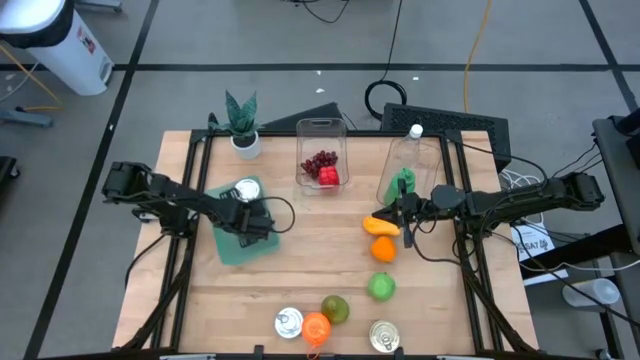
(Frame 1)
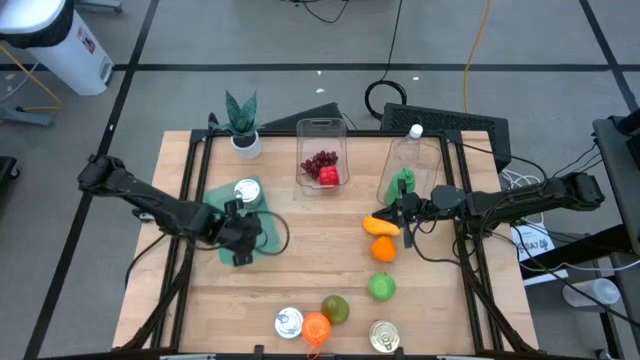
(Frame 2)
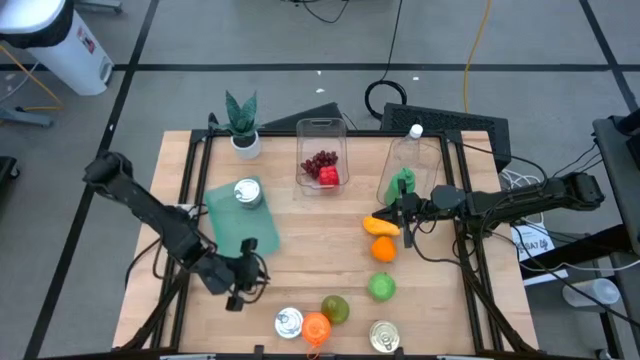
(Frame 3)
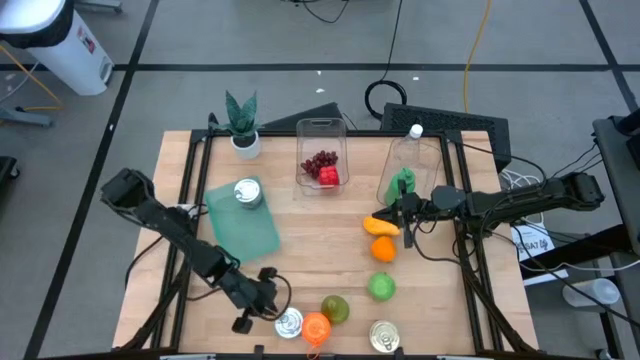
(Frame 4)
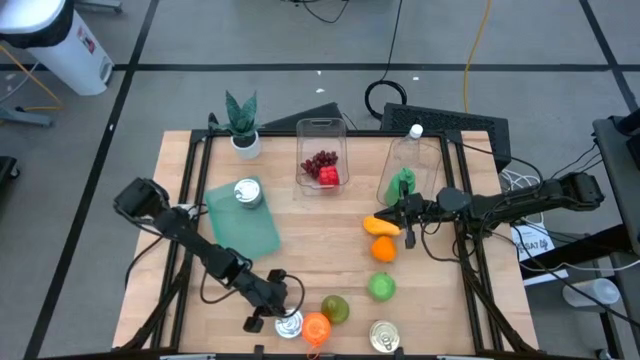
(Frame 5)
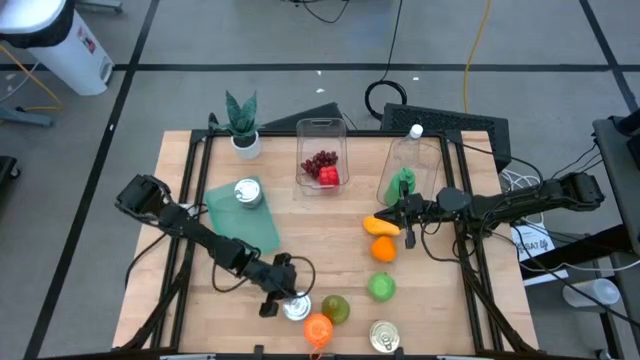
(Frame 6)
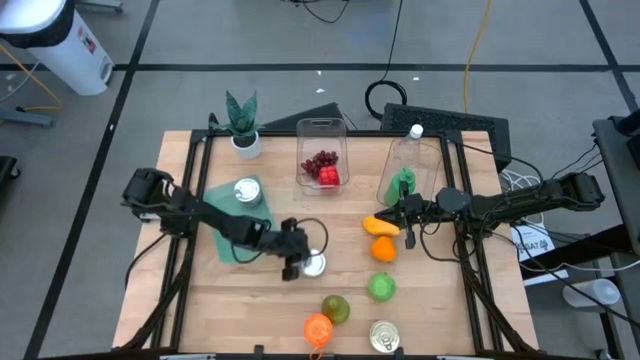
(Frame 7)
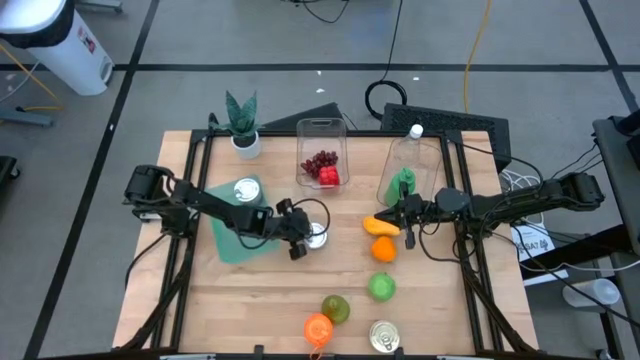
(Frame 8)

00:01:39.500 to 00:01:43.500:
Task: Pick & Place Food Item
Move the green tuna can to the middle of the table

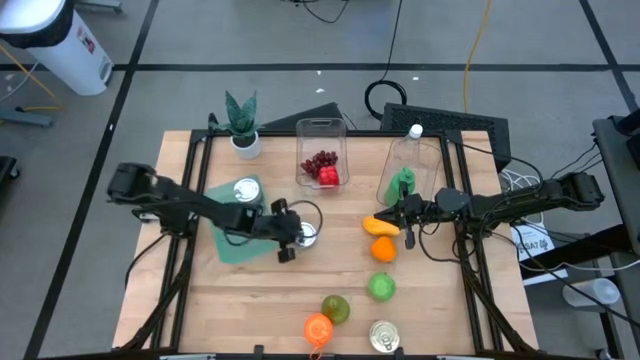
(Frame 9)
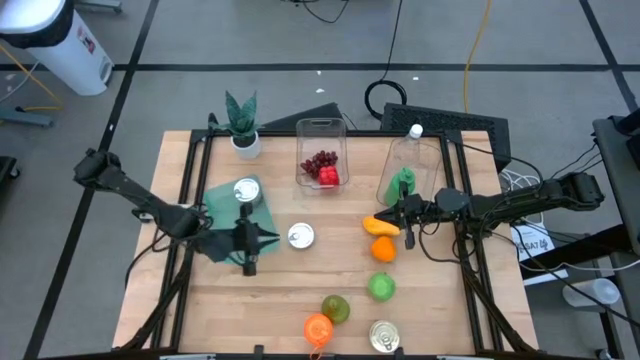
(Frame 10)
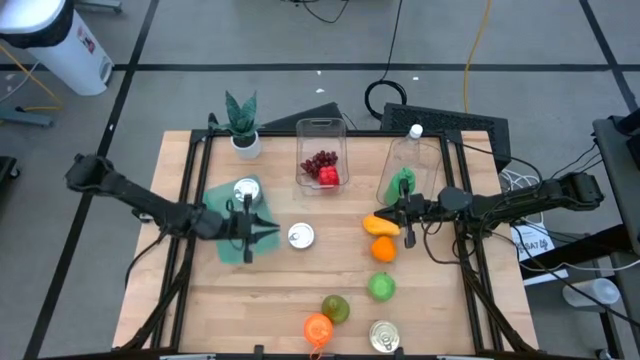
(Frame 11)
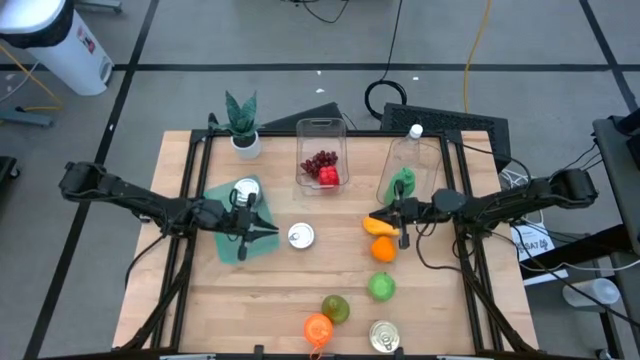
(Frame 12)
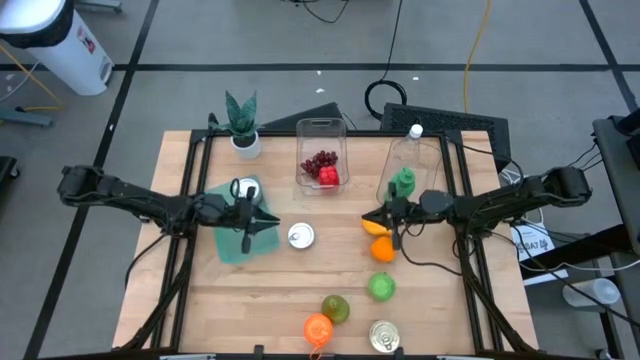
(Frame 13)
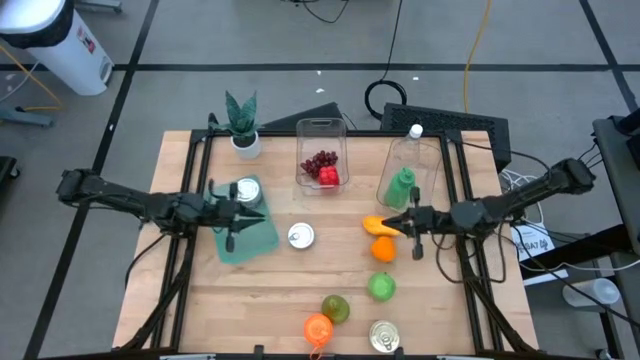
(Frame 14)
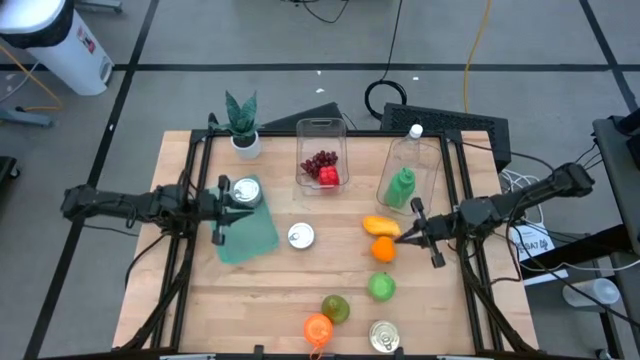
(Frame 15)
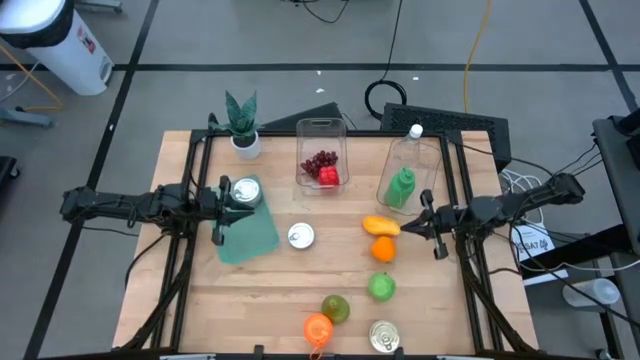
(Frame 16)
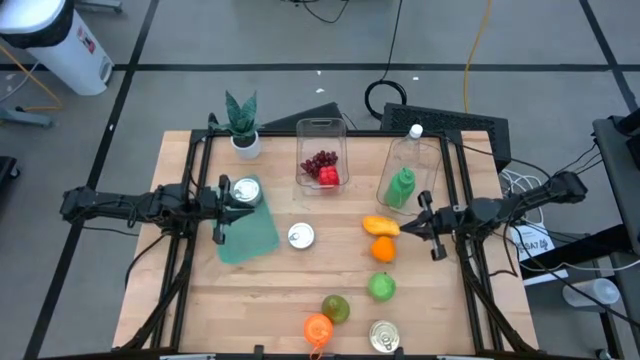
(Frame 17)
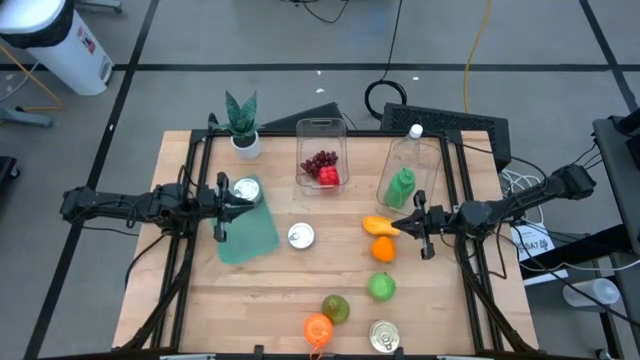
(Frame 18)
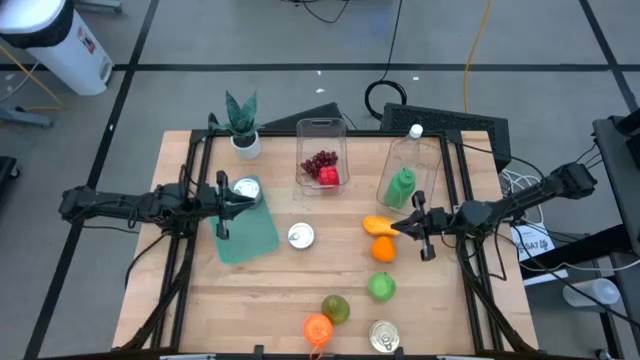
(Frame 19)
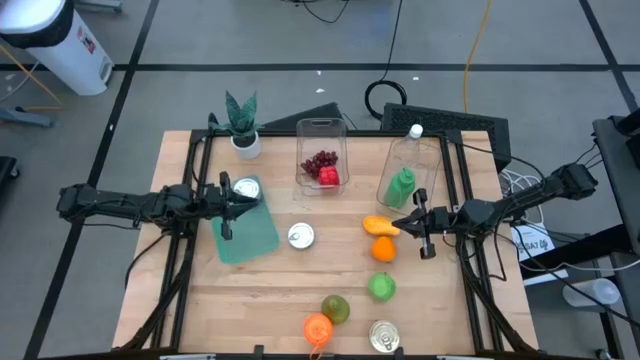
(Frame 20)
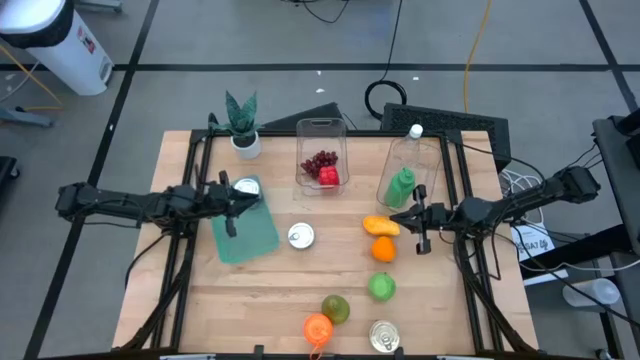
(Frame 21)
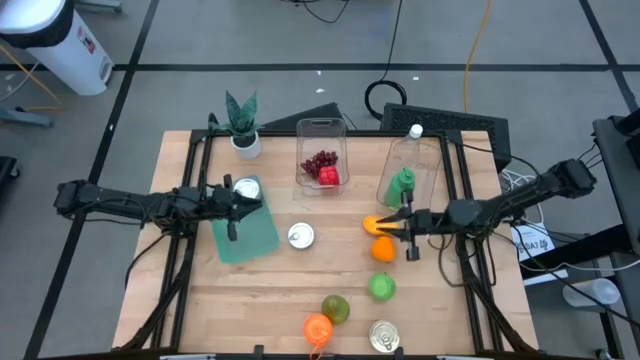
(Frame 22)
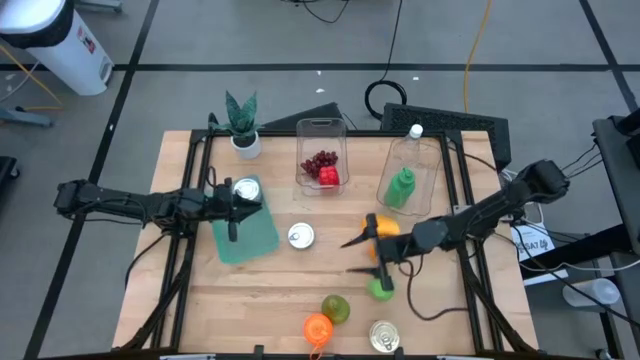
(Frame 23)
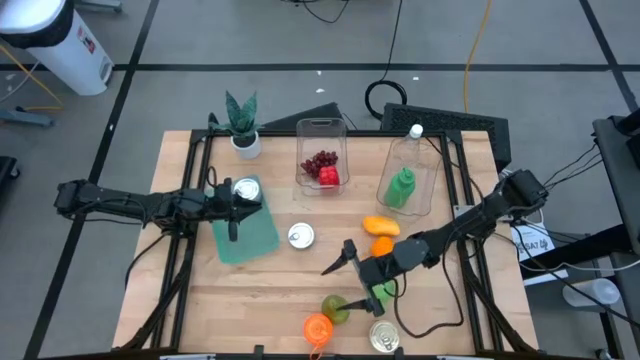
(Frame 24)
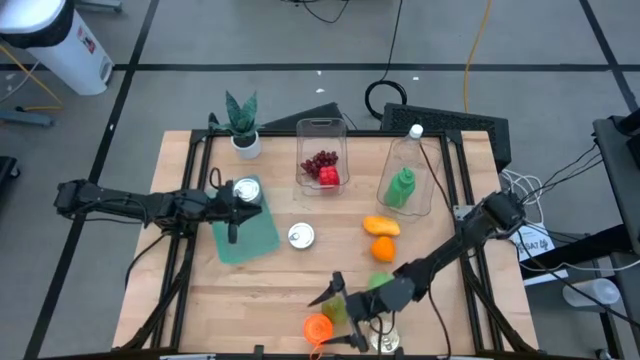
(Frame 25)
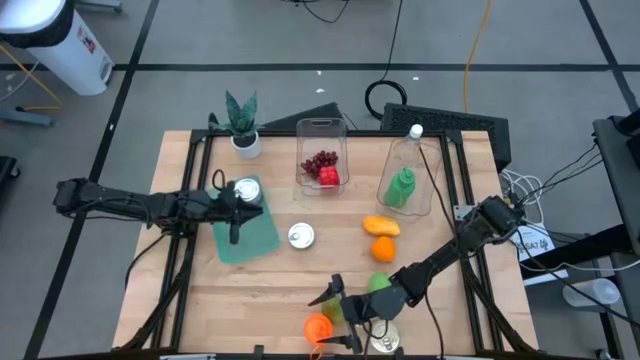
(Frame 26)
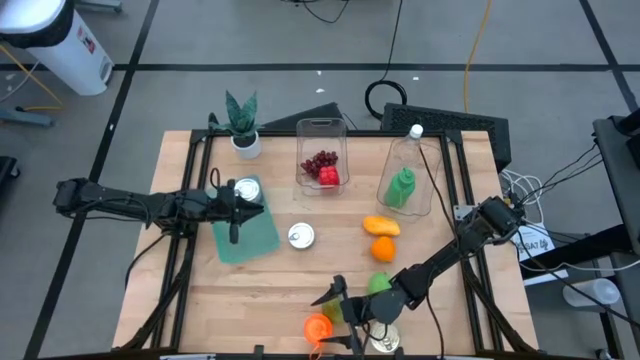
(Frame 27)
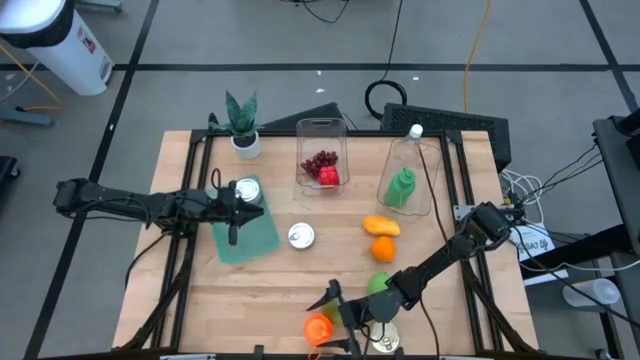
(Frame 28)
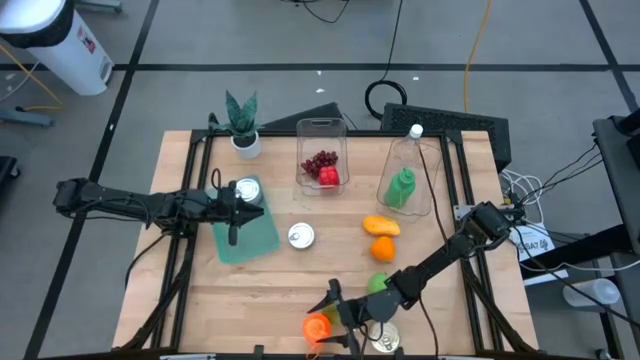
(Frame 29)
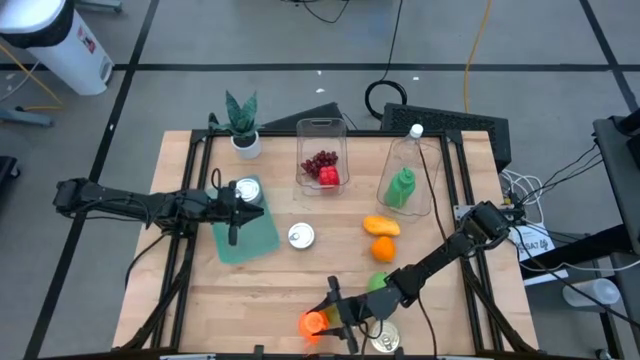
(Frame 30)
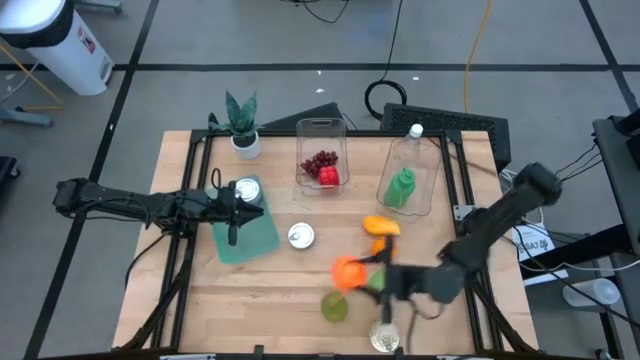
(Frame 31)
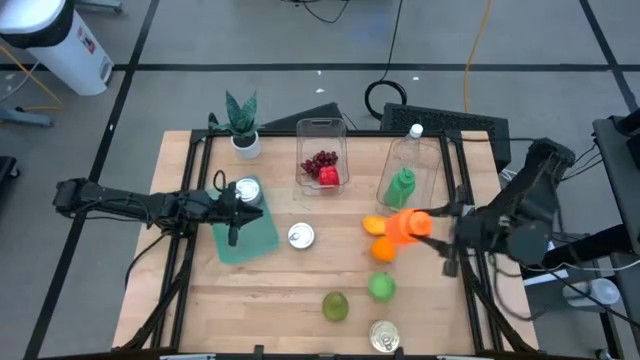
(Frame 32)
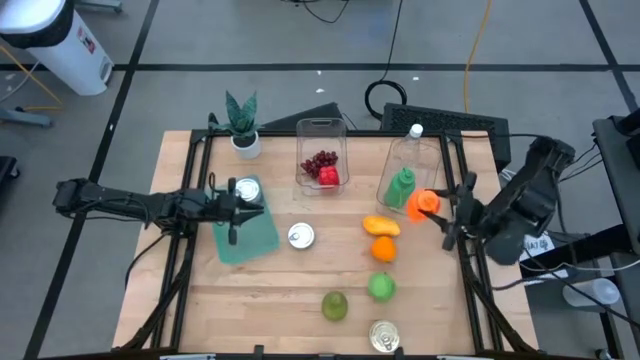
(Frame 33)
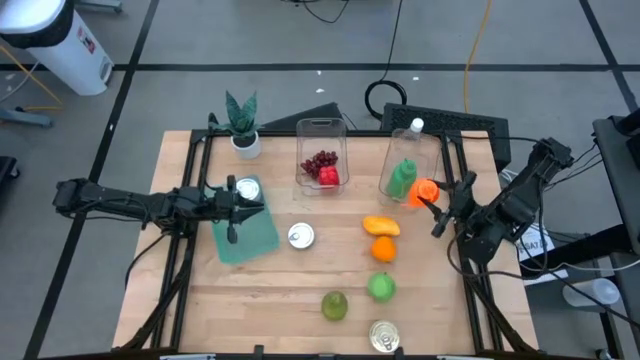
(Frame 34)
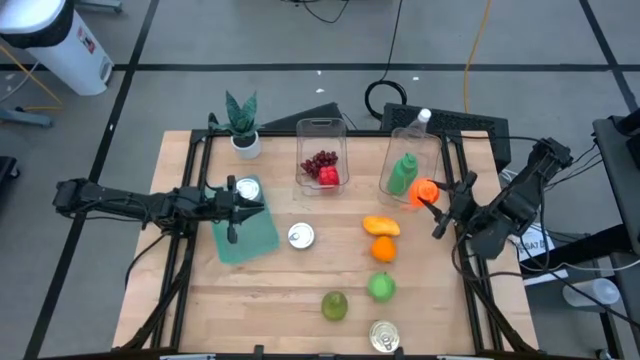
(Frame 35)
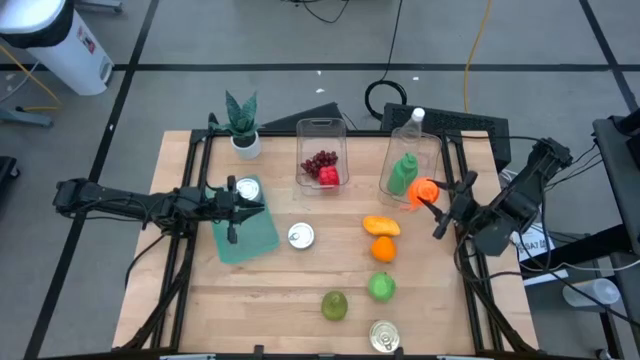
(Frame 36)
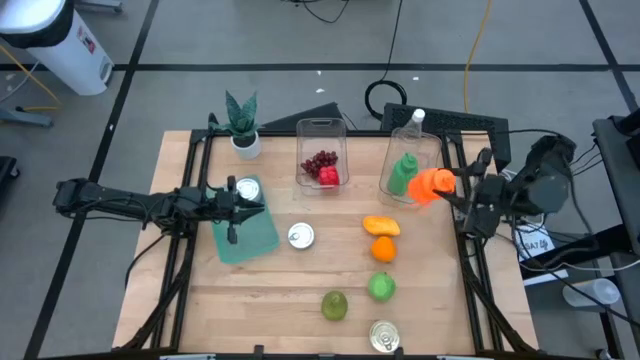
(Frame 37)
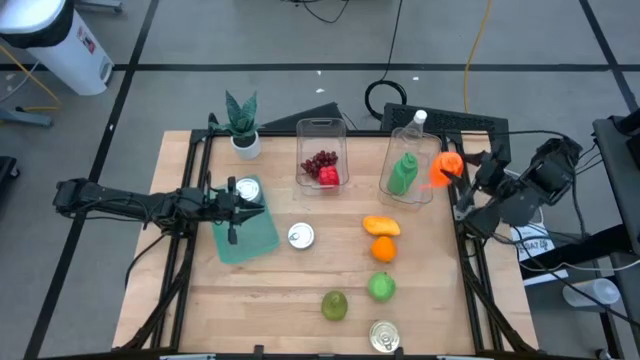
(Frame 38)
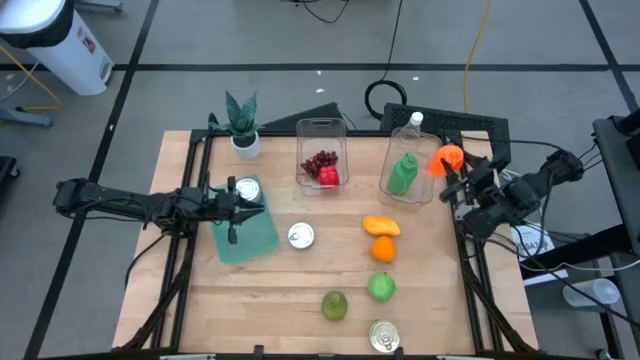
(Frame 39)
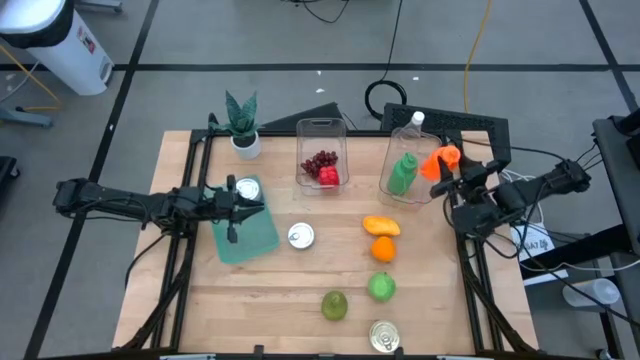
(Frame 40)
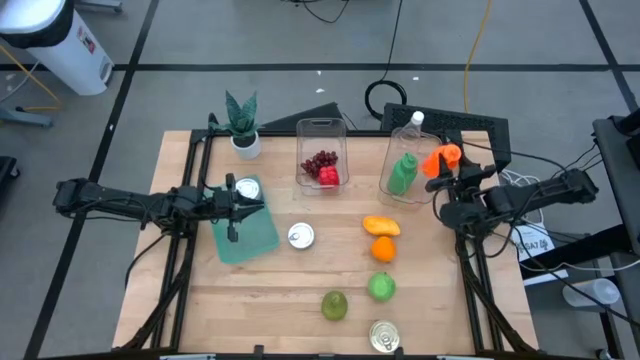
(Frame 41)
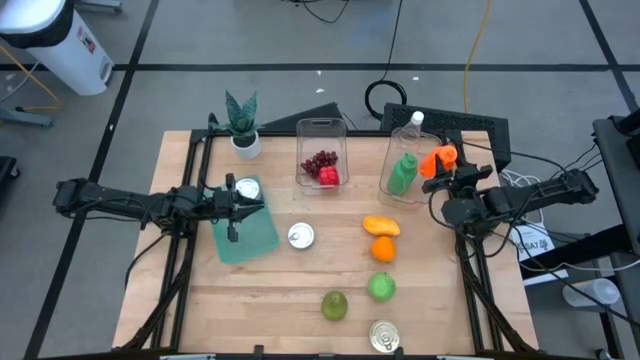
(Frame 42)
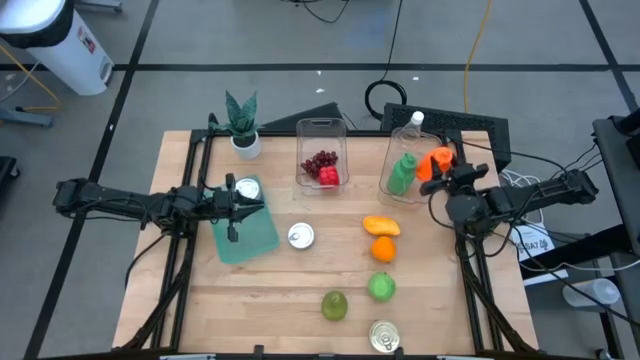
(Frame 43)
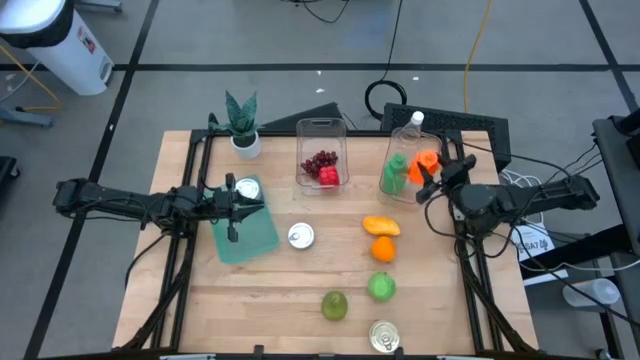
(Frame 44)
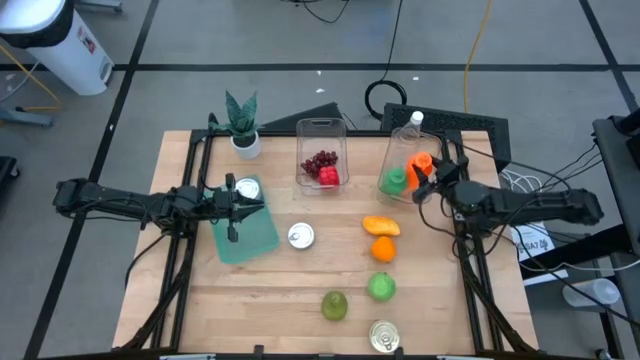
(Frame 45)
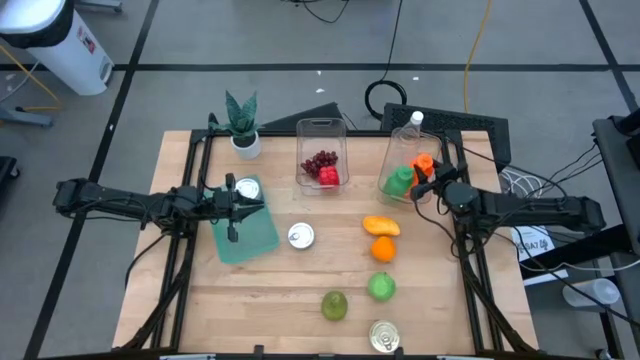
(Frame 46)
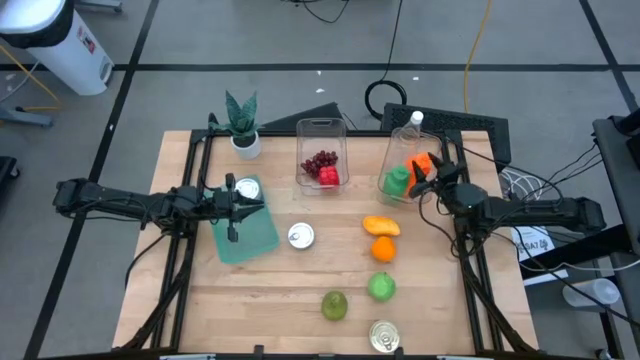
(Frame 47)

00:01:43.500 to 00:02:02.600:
Put the orange water bottle into the right transparent bin
